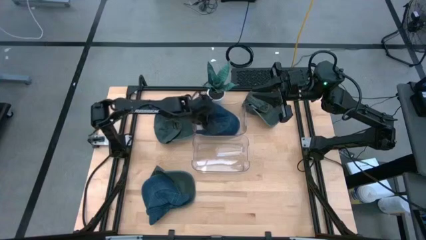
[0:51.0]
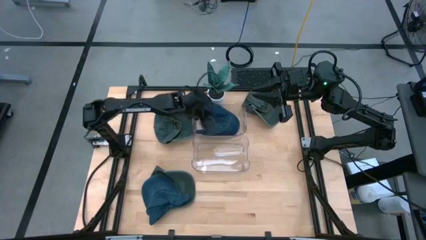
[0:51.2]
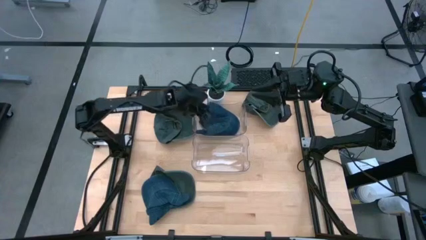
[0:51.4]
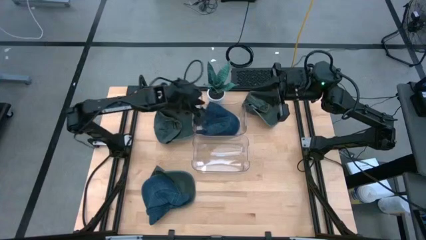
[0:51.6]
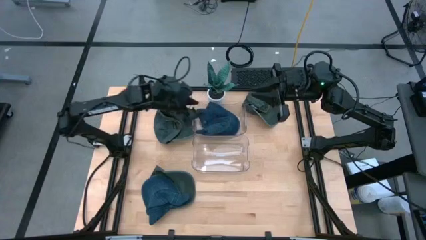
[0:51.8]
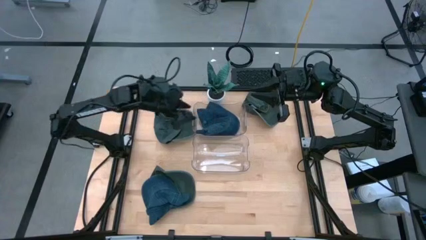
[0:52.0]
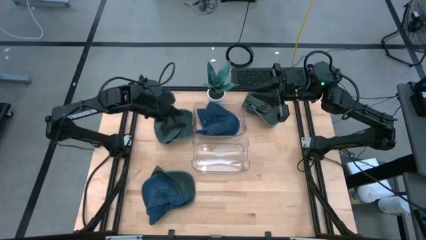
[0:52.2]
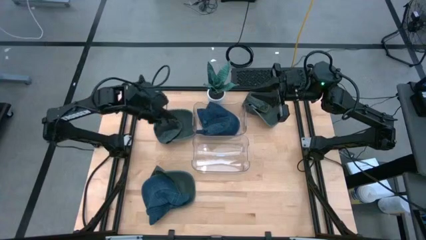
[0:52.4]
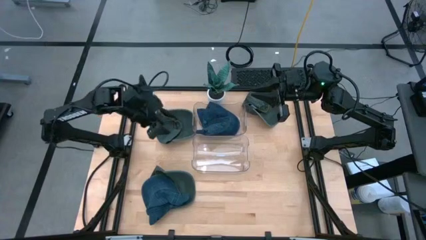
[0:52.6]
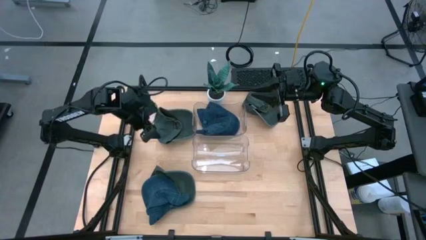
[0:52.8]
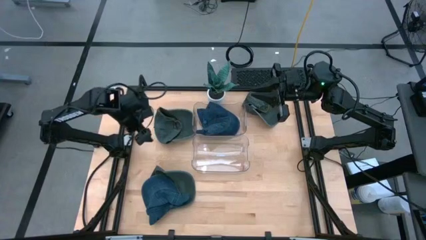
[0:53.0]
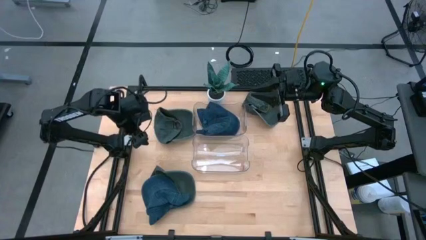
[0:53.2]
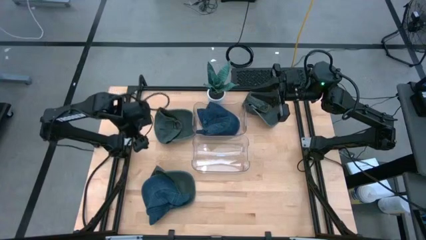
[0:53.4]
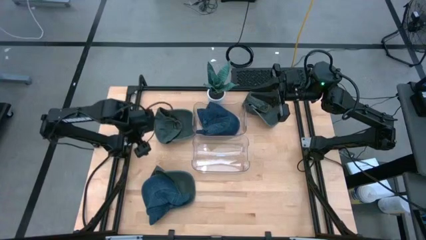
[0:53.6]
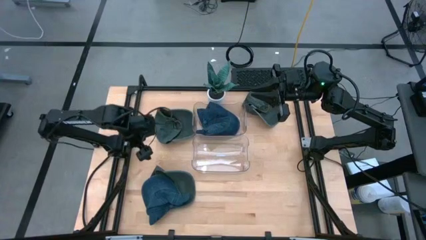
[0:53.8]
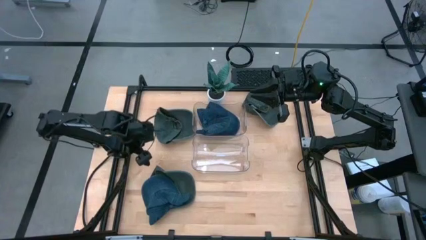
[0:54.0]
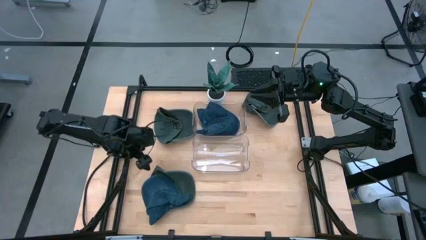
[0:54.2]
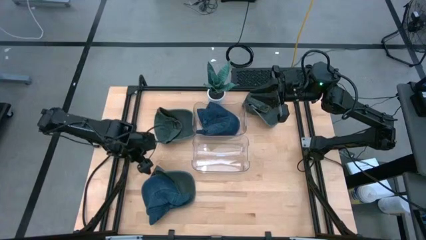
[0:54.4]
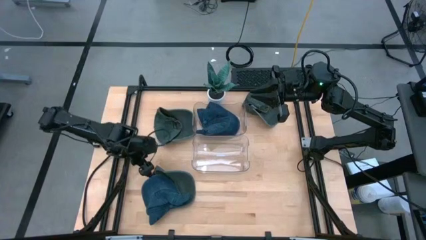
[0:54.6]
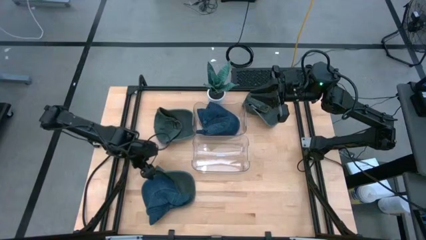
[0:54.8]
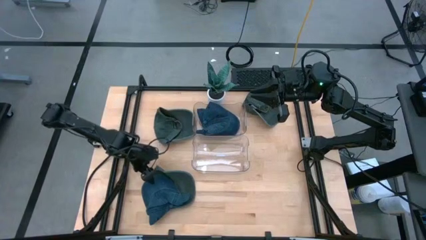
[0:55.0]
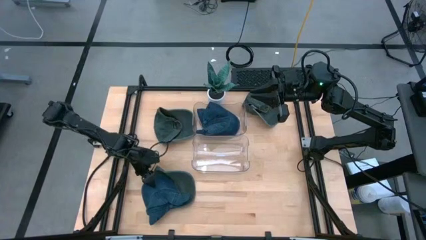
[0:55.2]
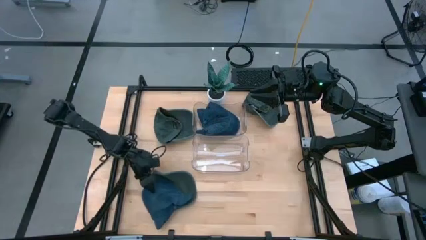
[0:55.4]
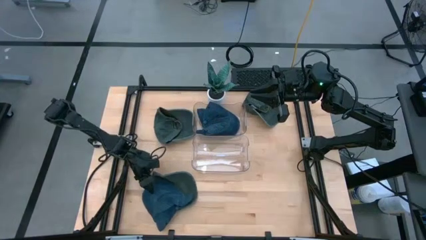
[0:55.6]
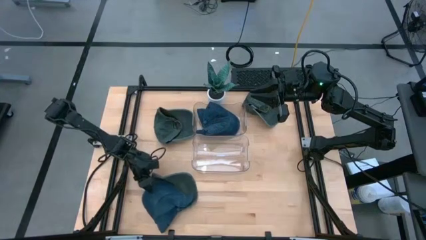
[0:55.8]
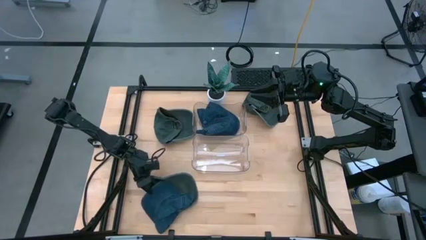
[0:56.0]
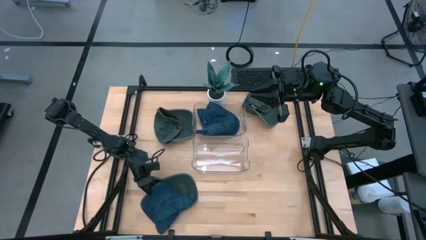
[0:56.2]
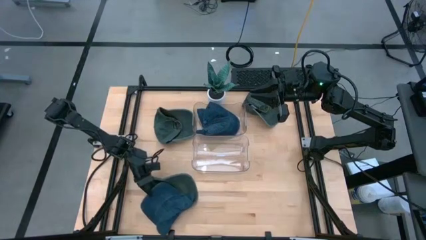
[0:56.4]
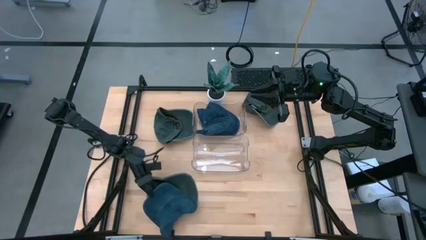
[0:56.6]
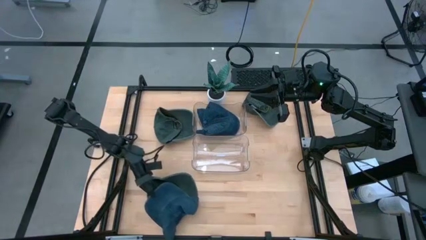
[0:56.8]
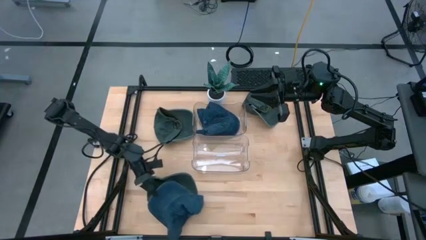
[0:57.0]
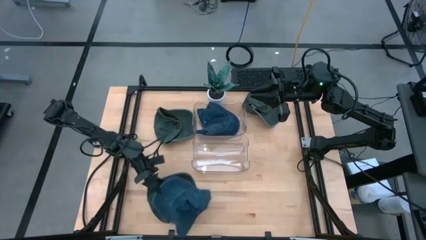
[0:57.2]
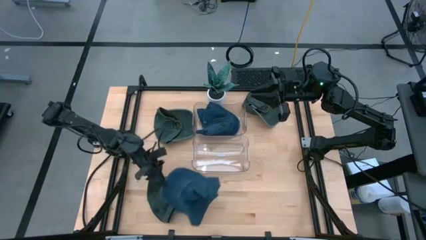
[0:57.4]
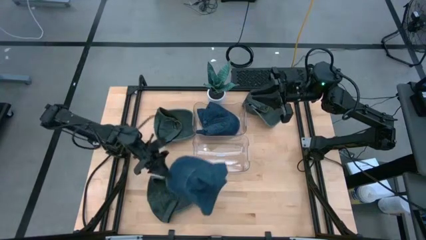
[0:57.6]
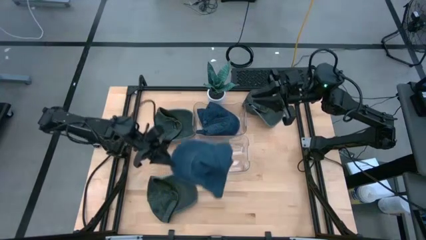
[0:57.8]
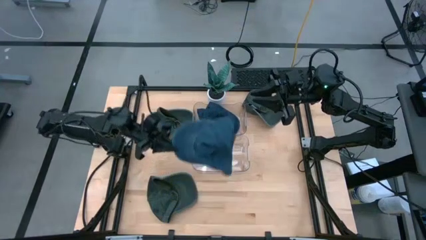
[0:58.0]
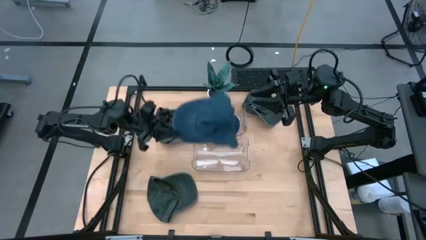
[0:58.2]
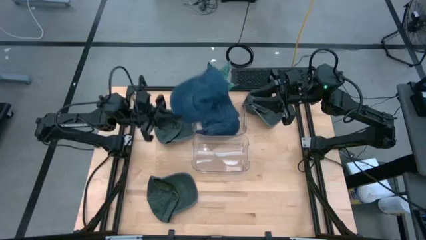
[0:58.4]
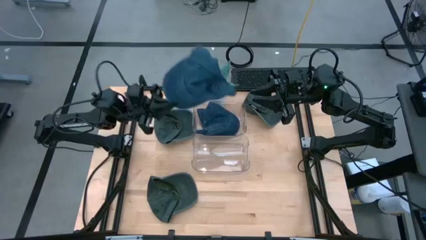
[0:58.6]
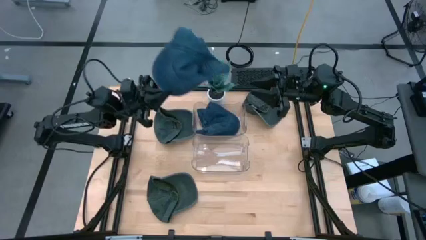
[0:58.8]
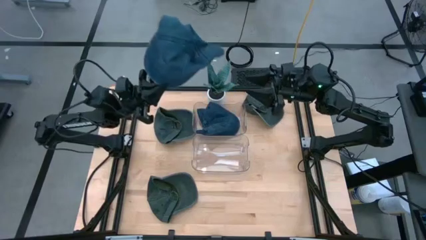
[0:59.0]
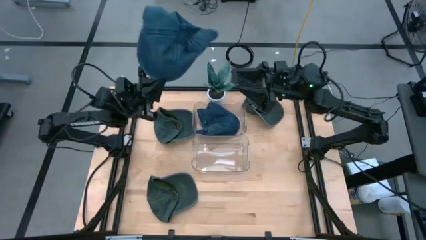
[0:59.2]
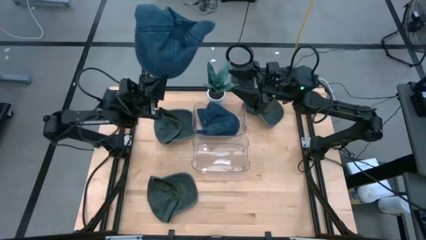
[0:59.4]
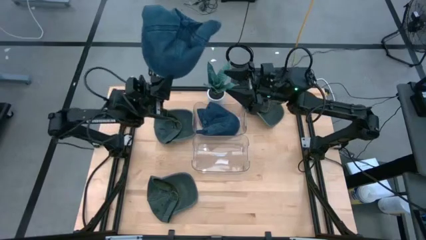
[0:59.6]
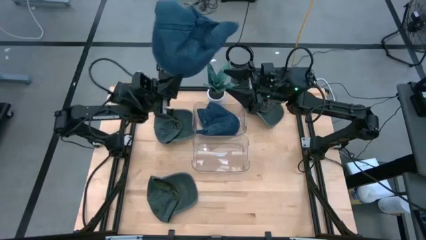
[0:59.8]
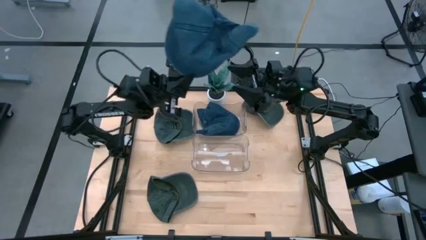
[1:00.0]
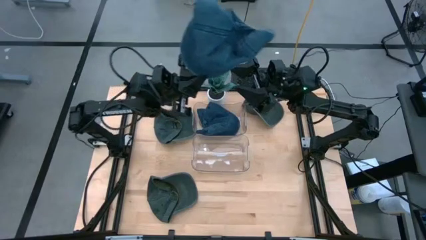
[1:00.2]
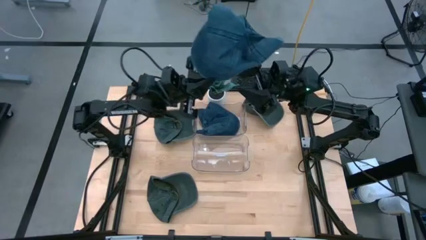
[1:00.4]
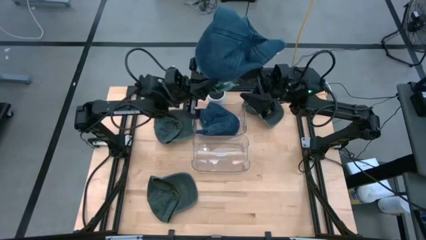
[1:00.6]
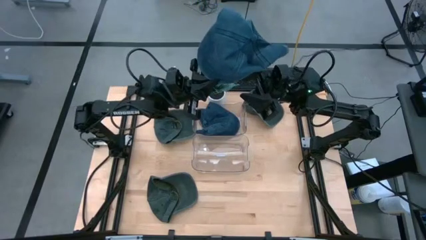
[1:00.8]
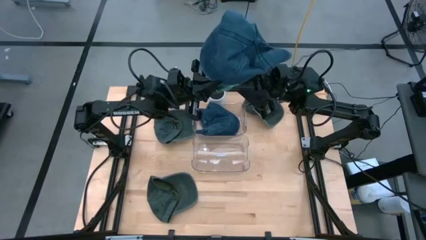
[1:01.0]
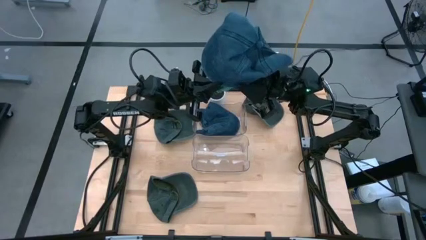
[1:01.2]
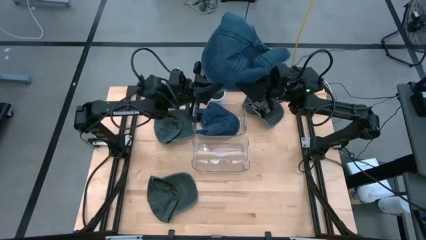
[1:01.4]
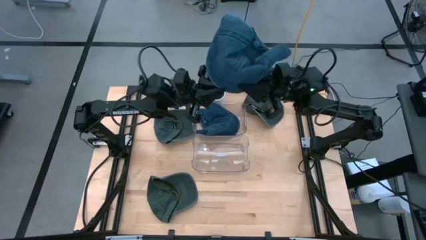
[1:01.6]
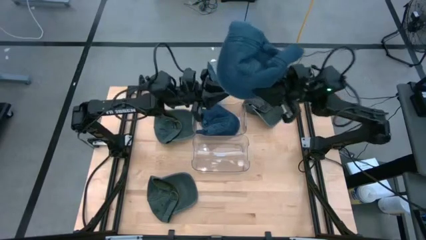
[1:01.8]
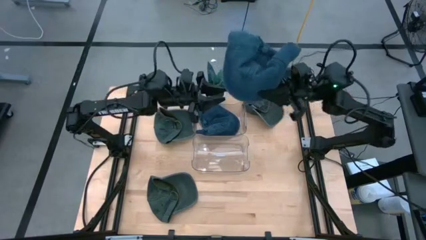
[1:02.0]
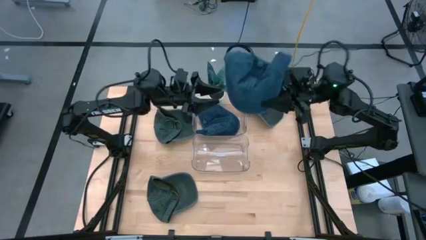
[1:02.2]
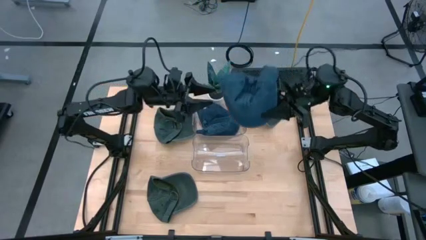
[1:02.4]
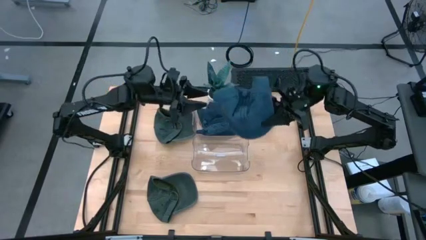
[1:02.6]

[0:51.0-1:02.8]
Task: Pick & Place hat
Put the blue cap into the top transparent bin

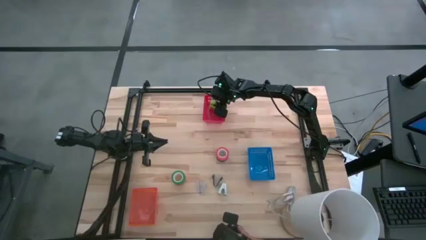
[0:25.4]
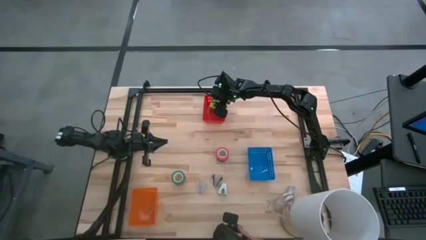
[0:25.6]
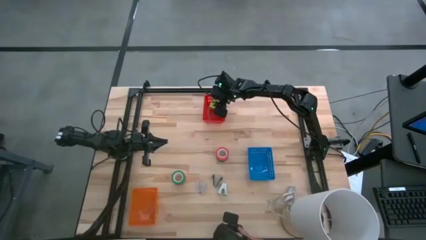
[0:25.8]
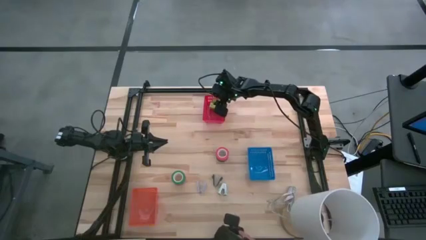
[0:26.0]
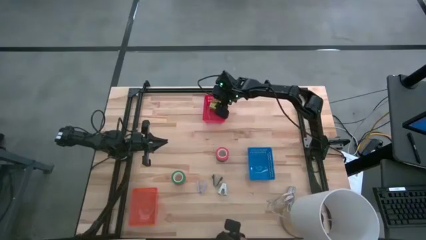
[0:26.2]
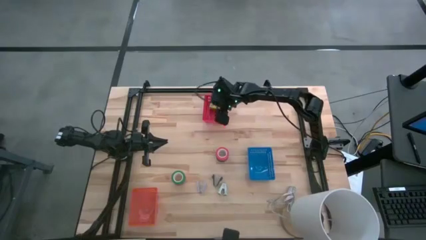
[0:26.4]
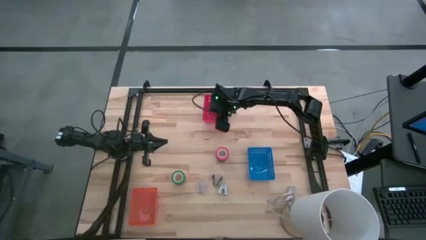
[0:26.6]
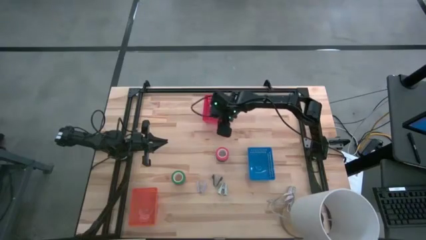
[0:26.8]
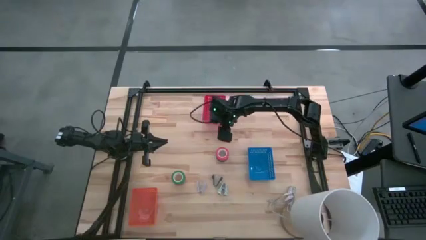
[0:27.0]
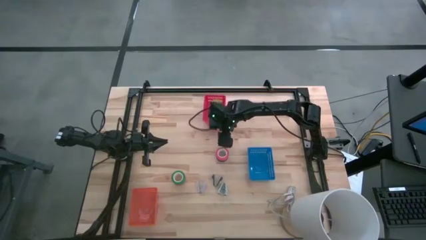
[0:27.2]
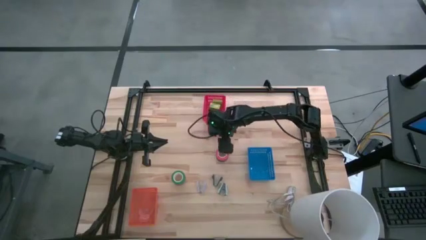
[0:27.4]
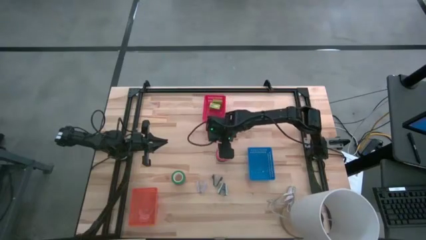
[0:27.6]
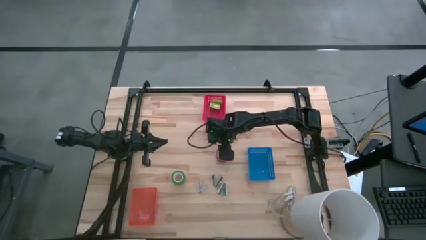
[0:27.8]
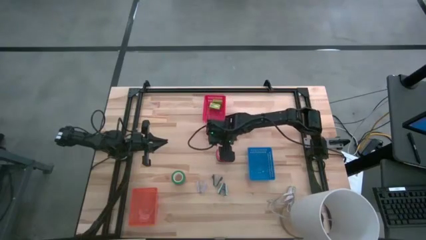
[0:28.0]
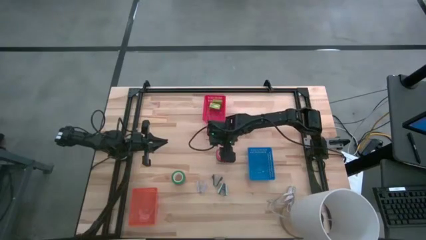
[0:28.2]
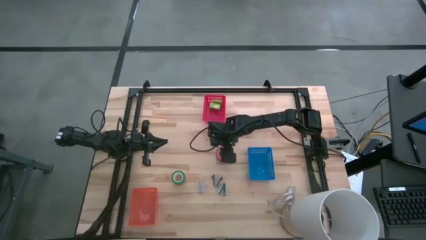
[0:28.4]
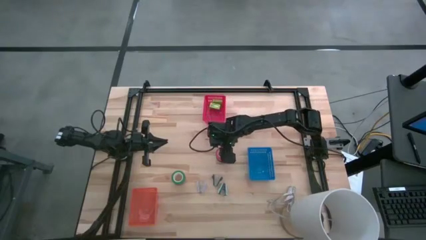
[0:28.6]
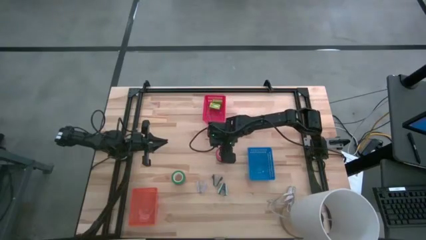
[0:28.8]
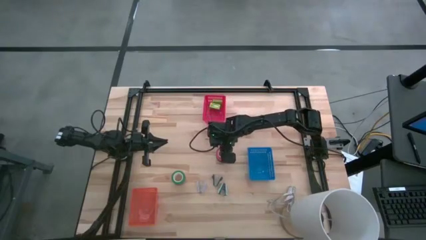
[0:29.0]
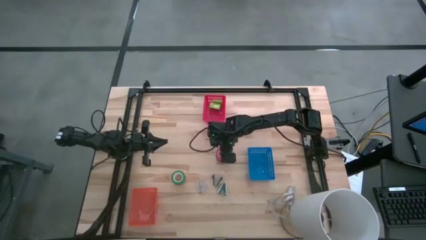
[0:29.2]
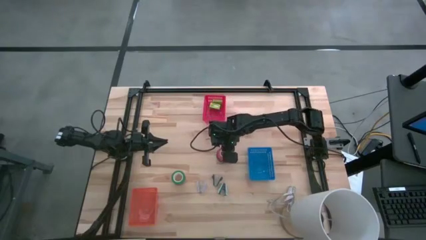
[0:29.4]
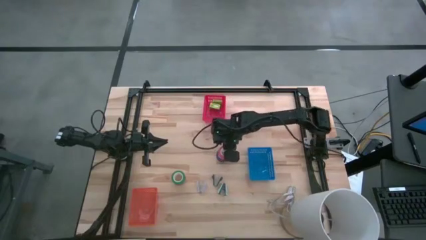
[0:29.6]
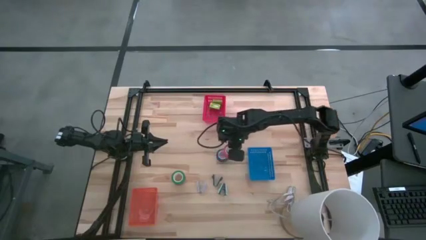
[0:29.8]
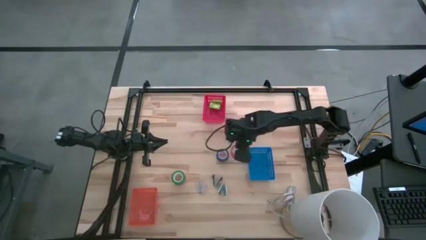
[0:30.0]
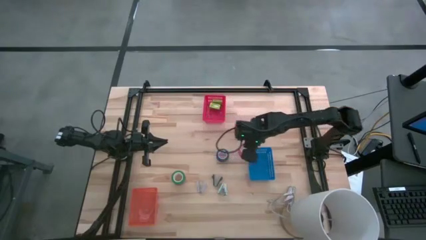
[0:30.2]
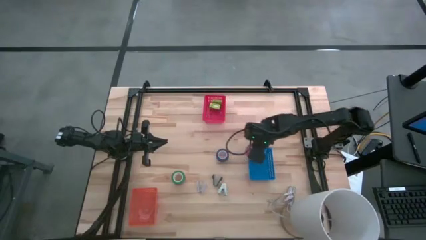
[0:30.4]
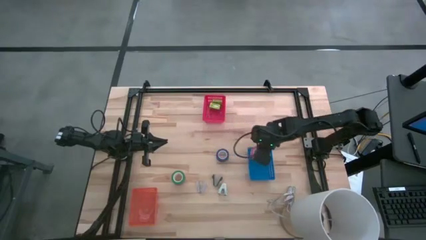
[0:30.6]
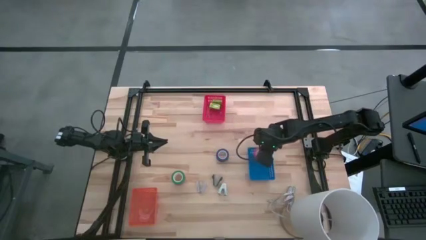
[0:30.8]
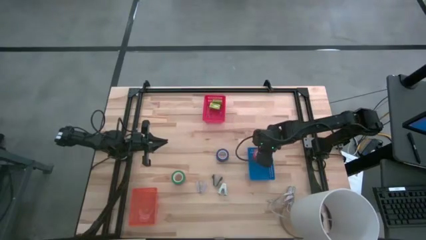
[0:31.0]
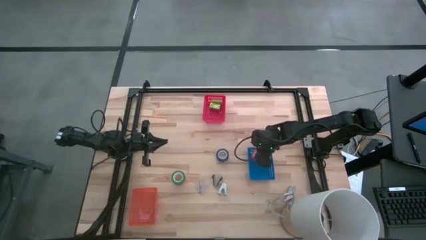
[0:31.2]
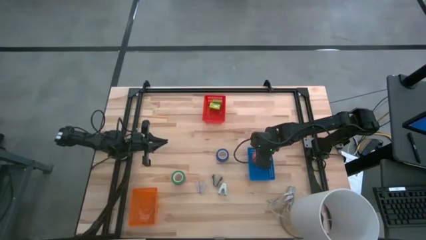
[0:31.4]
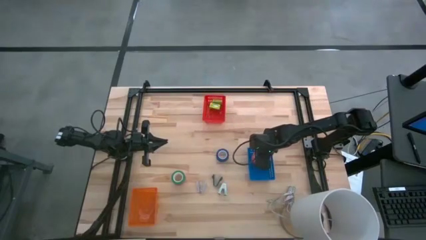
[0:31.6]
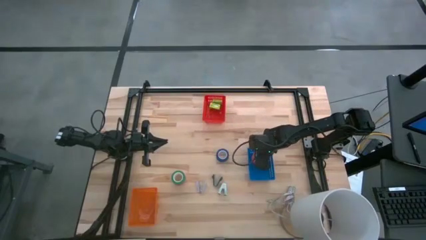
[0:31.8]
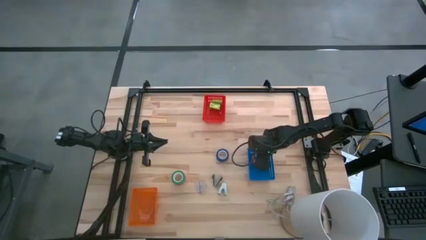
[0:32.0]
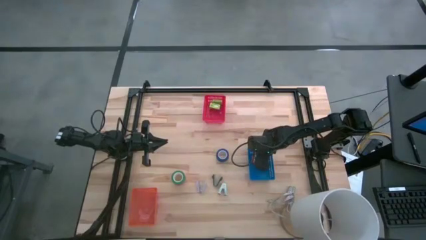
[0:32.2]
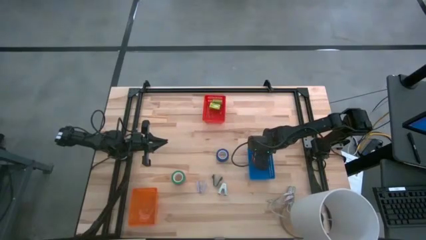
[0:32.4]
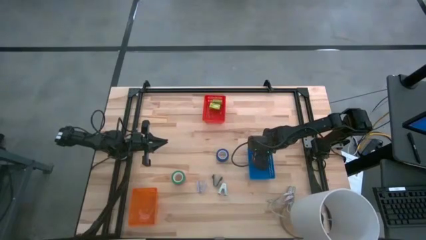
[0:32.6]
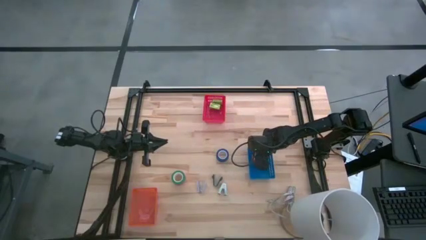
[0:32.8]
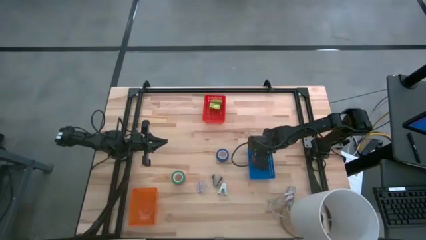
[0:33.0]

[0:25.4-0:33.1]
Task: Pick and place Stapler, Stapler remover, tape
Put the red tape into the blue bin
